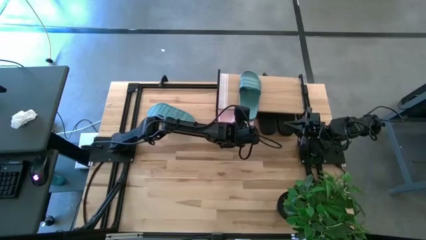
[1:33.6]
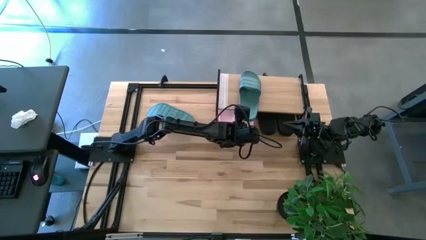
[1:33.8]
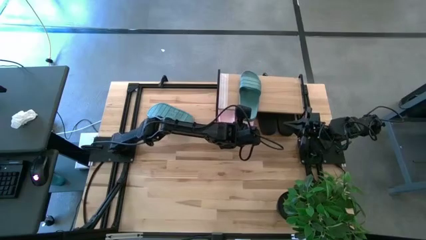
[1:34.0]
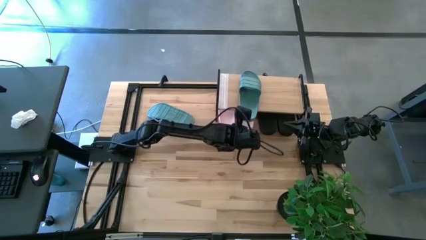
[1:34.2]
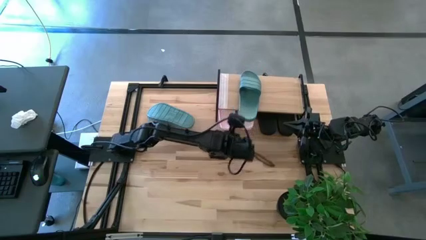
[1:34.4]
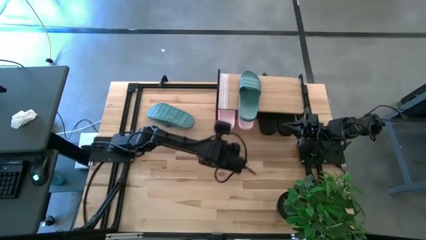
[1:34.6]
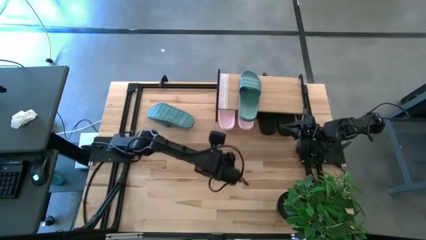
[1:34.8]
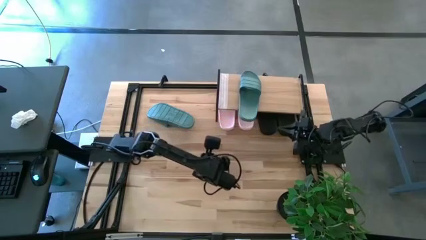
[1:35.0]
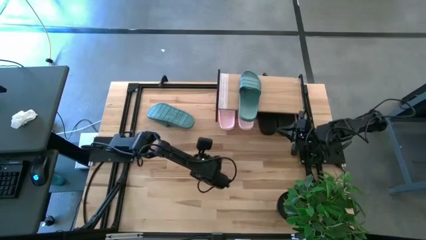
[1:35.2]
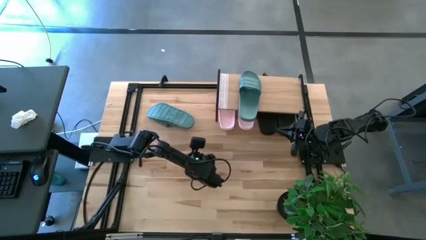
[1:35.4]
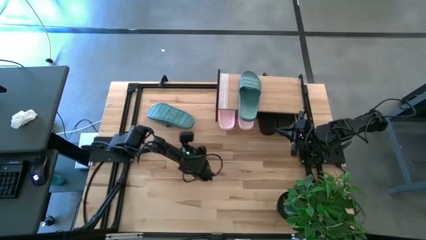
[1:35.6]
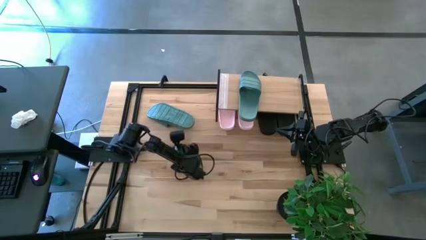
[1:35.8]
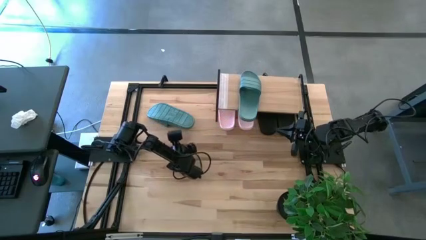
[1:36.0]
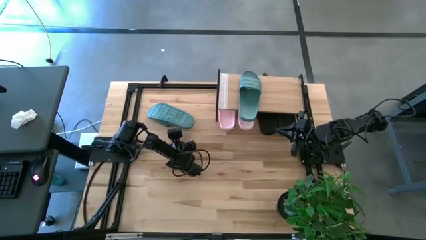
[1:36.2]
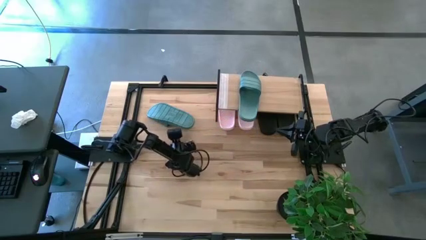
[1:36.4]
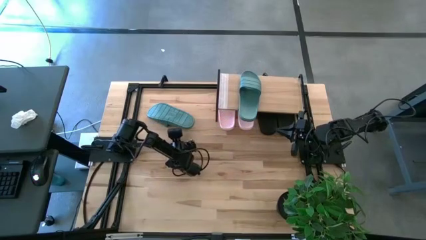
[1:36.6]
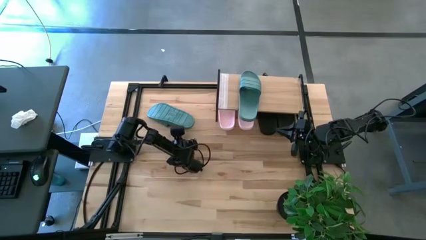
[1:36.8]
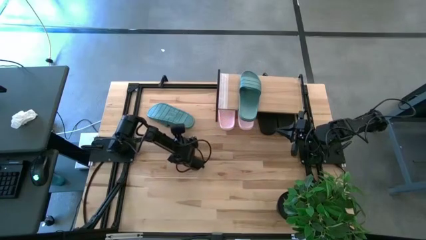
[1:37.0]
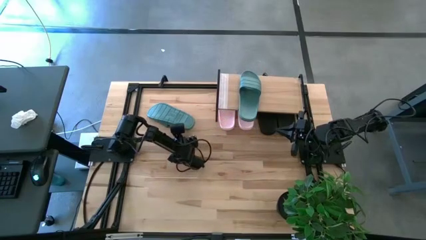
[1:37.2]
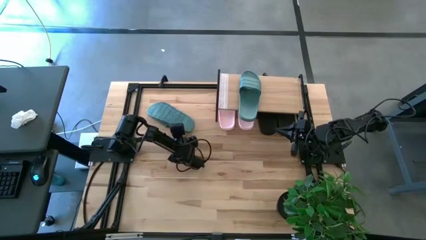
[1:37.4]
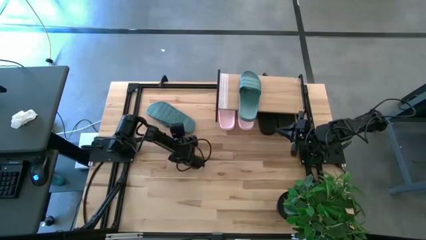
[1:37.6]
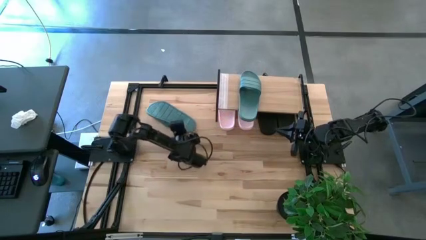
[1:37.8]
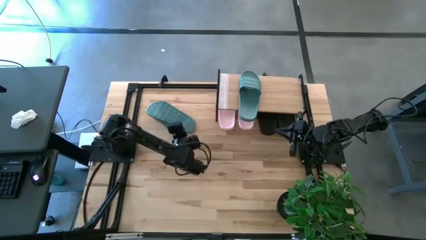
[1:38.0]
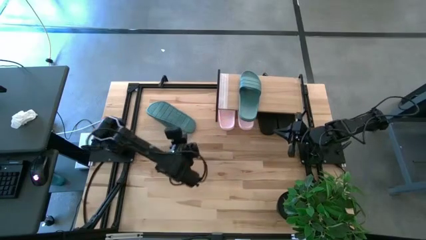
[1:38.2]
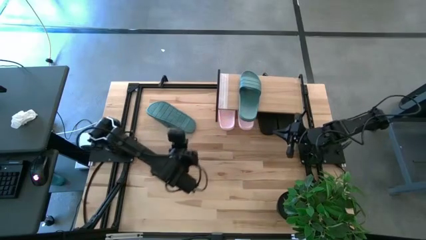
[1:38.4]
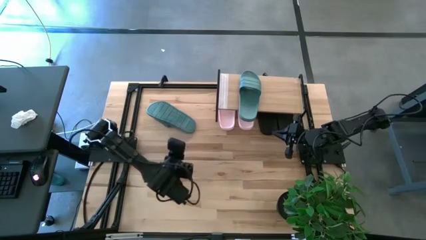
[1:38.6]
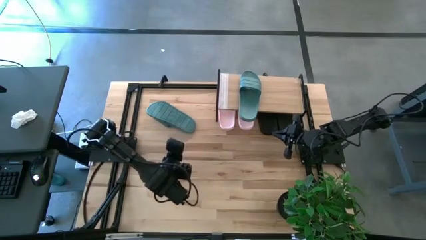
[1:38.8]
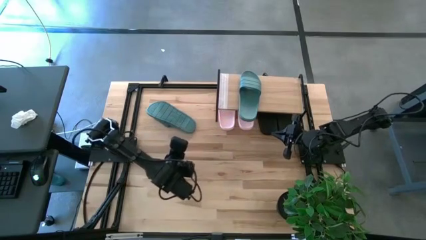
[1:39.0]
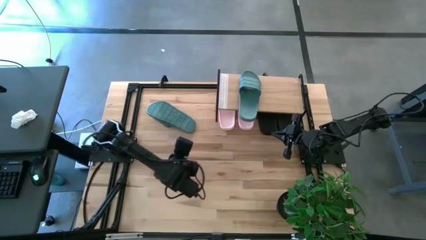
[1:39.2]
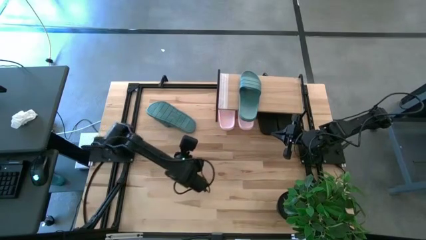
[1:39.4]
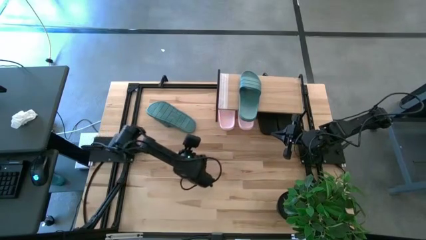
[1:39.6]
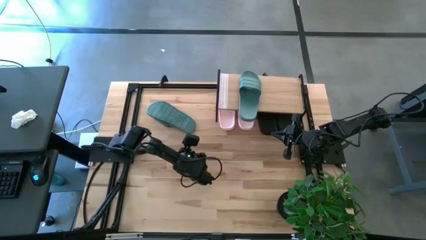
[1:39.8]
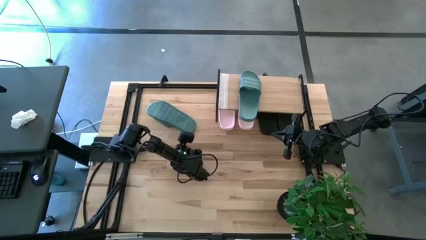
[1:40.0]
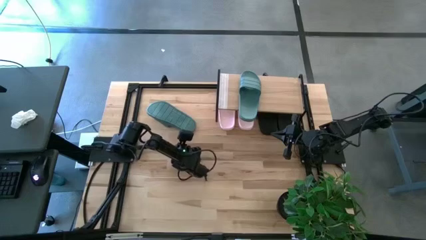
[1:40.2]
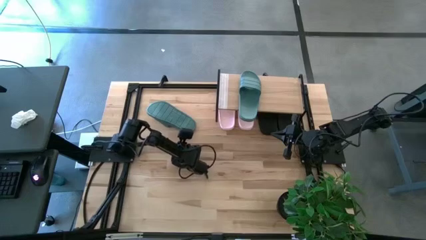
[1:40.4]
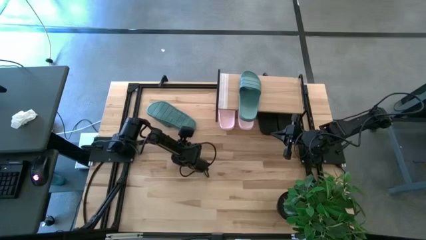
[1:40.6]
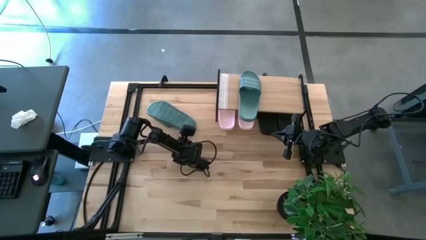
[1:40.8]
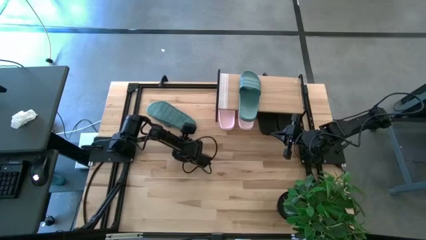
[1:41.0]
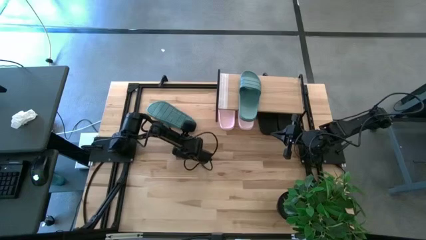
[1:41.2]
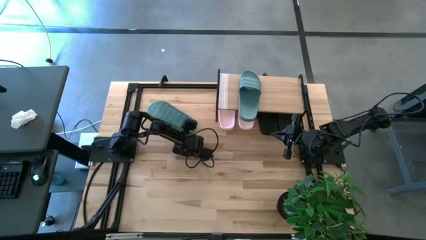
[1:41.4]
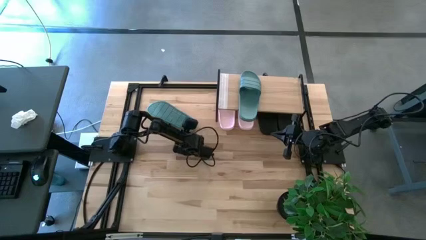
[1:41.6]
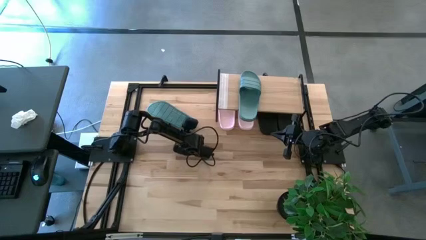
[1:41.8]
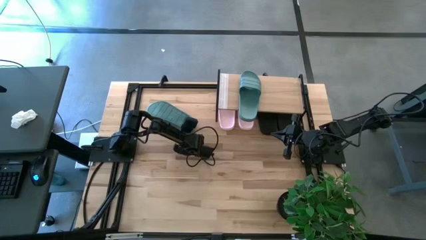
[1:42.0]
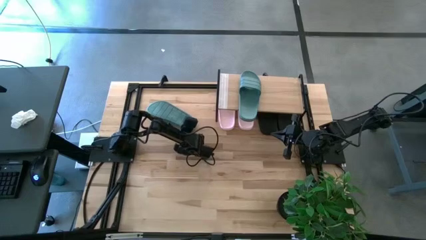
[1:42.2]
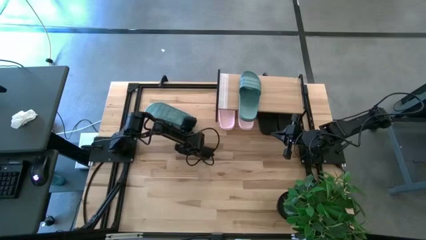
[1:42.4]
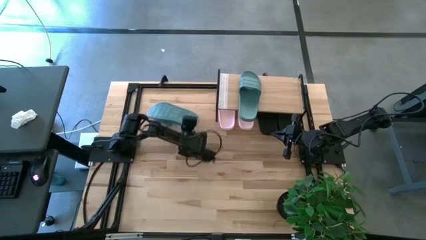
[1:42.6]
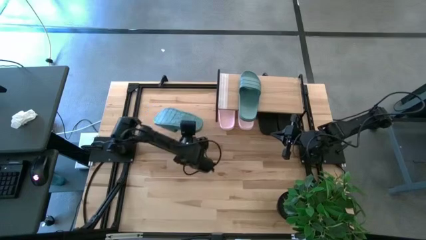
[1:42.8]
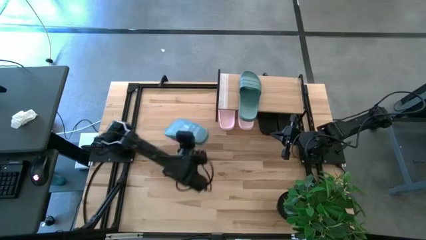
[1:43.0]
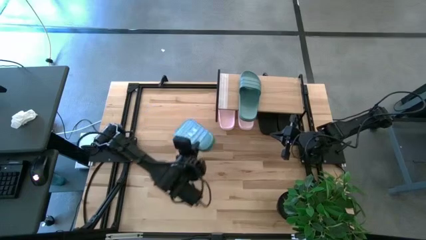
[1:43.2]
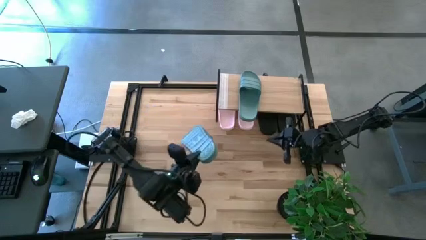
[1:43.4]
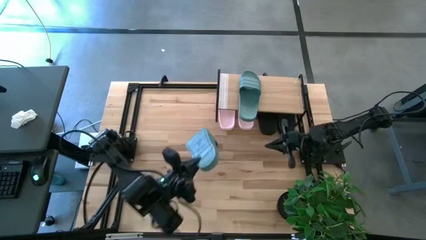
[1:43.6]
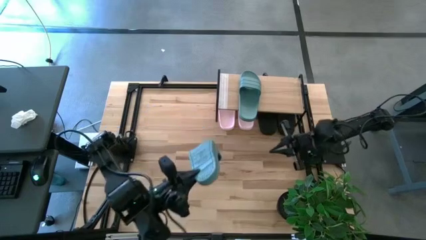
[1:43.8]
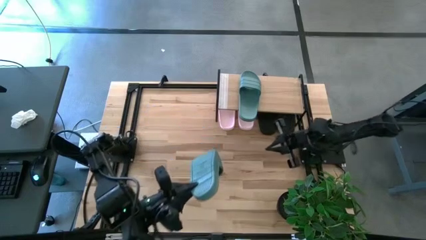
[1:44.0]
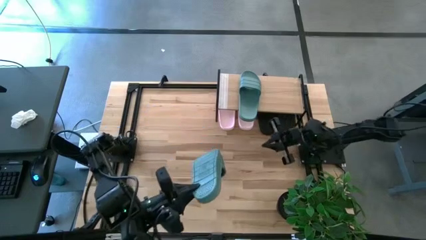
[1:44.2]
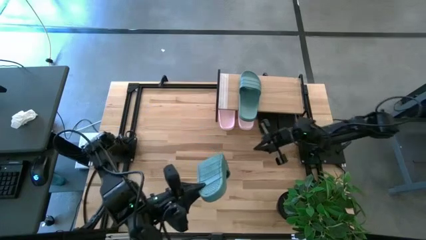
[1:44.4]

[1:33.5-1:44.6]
Task: Pick and place slides into the shelf
Put the green slipper on the shelf

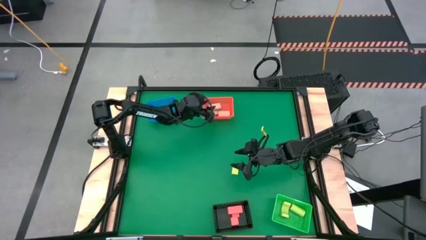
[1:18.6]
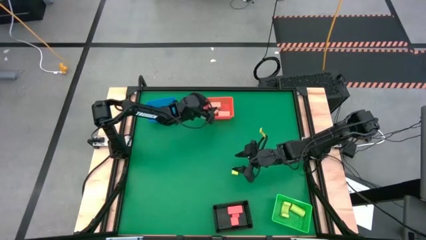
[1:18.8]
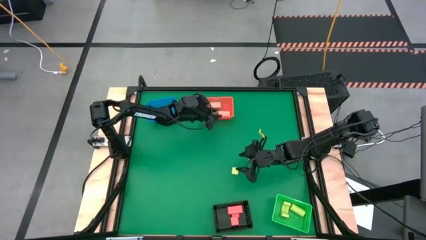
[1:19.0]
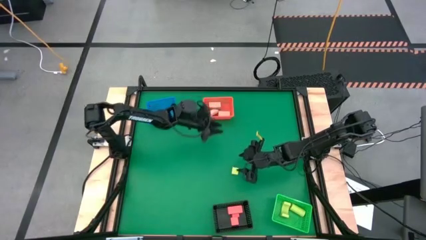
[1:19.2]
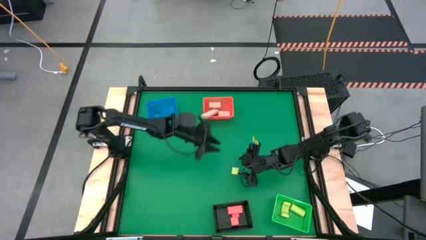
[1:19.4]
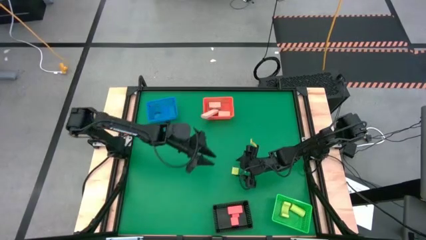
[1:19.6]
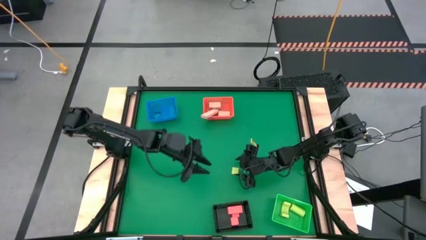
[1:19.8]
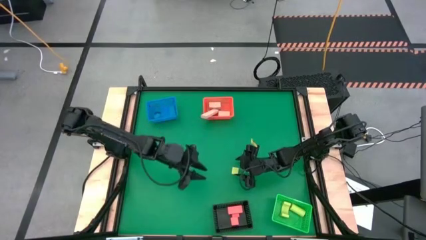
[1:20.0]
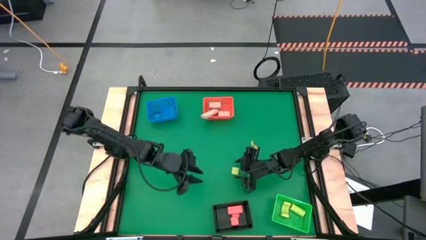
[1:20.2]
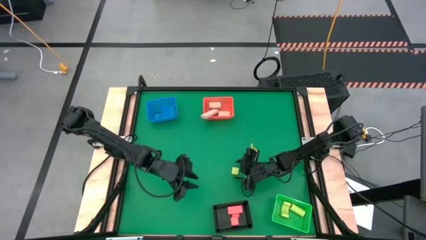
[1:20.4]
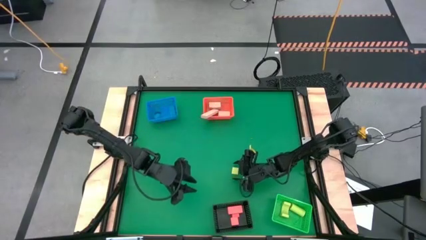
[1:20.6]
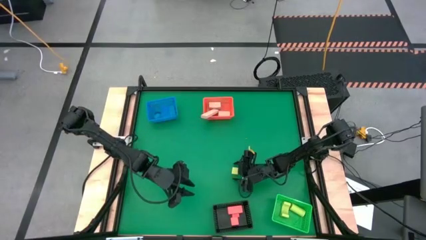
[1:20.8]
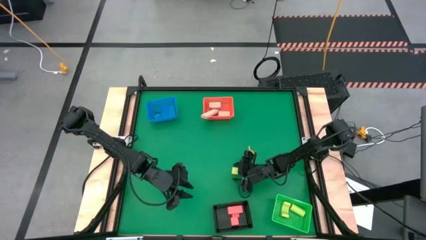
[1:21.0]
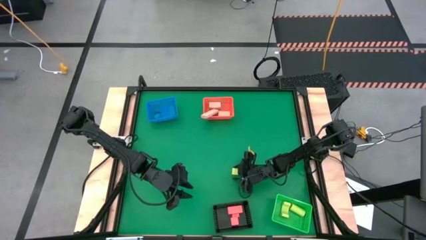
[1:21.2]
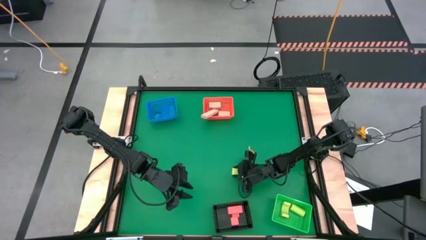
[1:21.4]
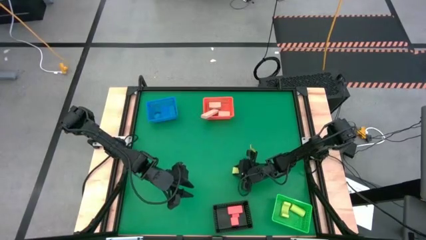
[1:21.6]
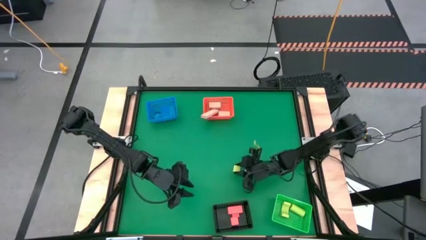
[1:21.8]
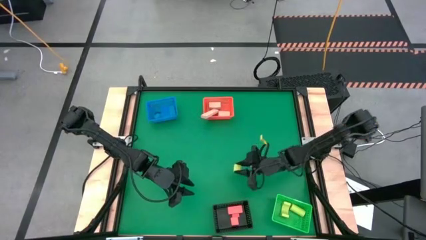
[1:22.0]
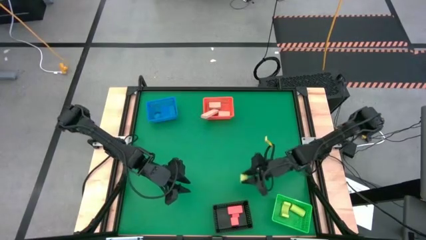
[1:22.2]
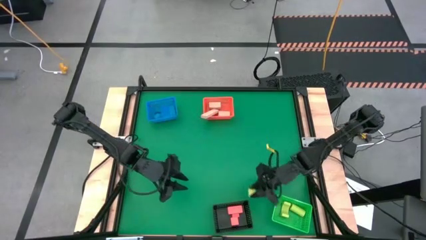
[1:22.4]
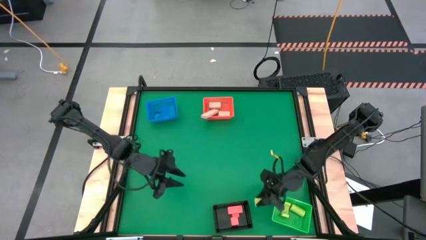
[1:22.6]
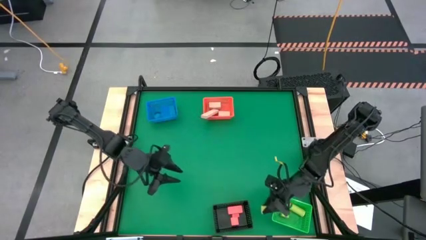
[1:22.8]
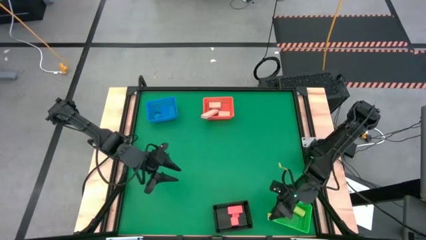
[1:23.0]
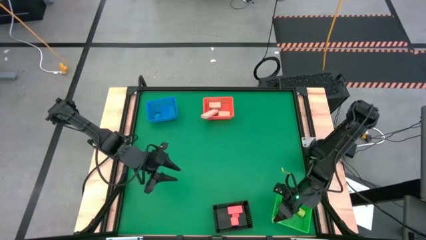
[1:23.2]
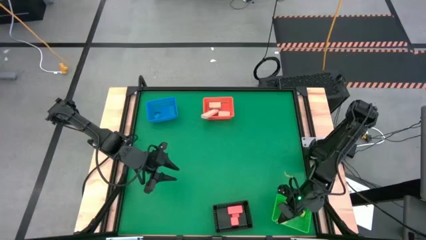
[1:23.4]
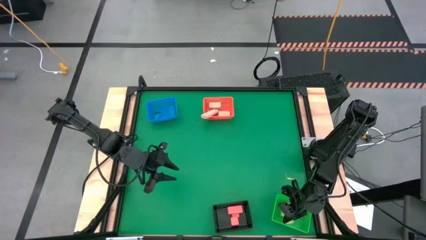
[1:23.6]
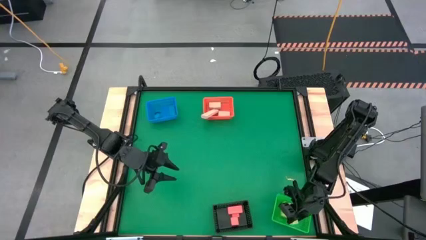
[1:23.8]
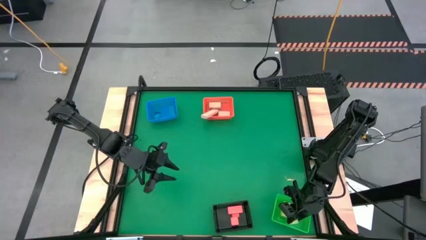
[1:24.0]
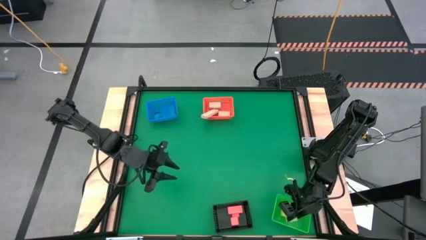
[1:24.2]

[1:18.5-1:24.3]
Task: Sort & place blocks by color
Put the green block into the green bin
